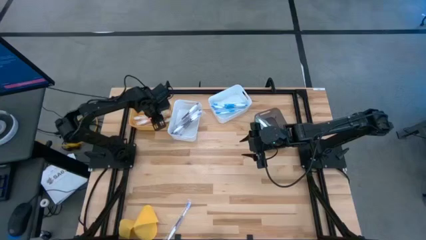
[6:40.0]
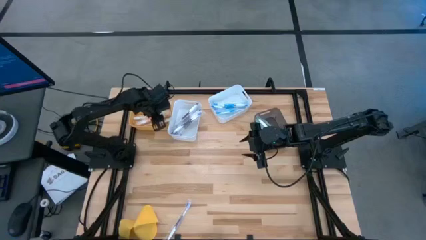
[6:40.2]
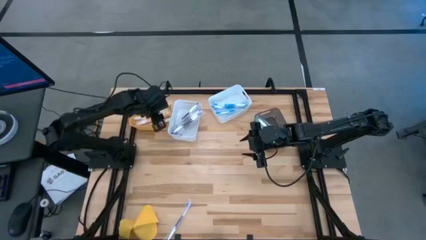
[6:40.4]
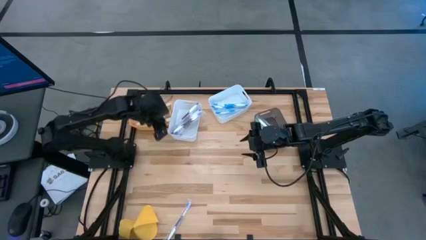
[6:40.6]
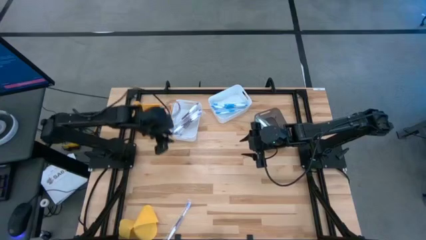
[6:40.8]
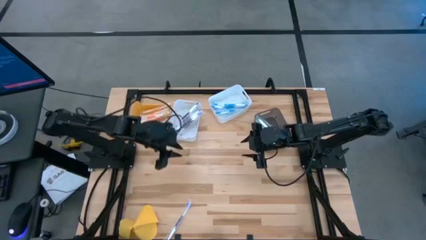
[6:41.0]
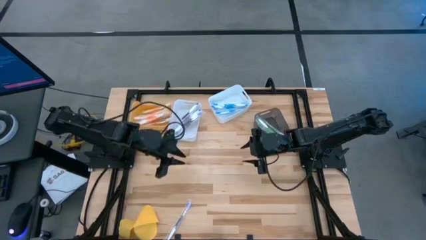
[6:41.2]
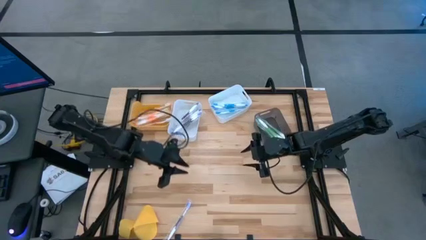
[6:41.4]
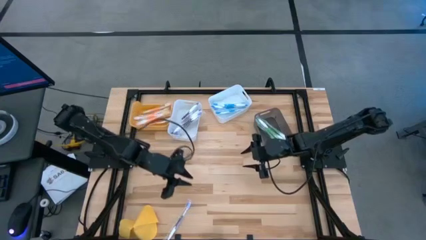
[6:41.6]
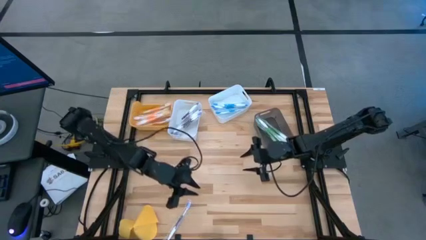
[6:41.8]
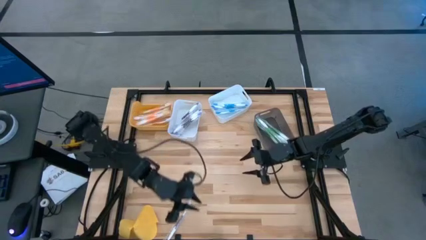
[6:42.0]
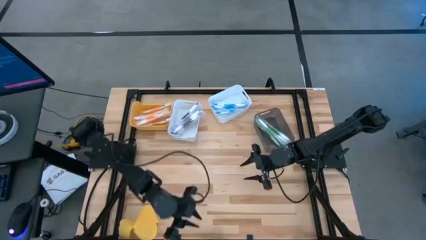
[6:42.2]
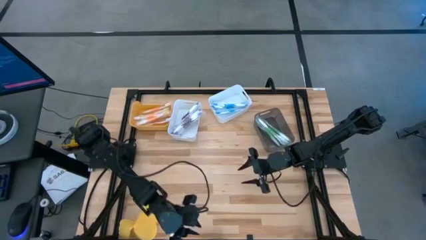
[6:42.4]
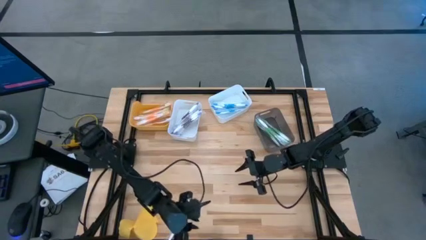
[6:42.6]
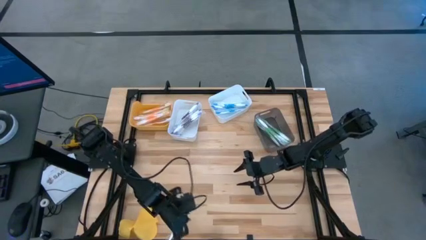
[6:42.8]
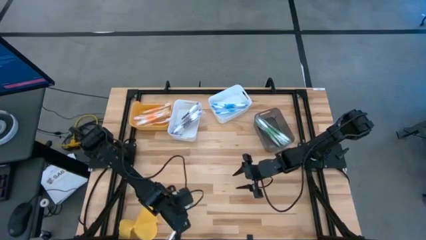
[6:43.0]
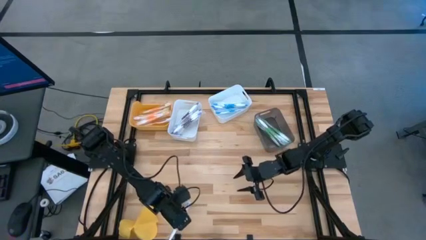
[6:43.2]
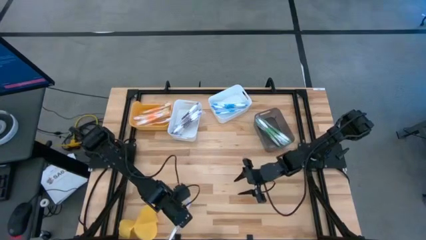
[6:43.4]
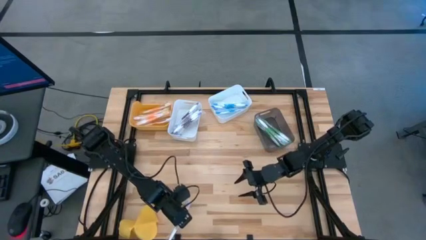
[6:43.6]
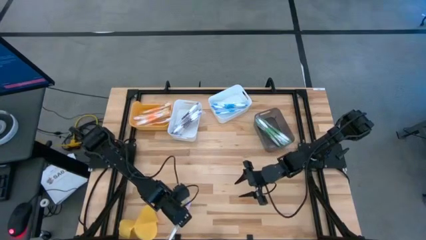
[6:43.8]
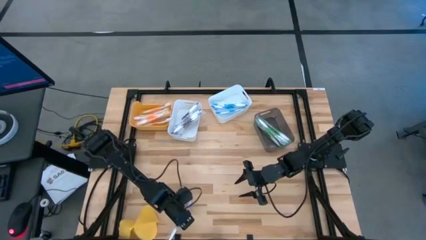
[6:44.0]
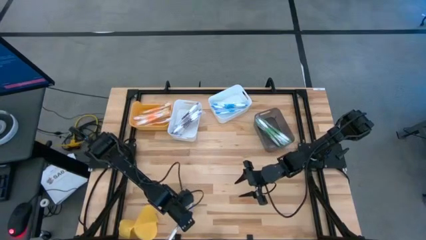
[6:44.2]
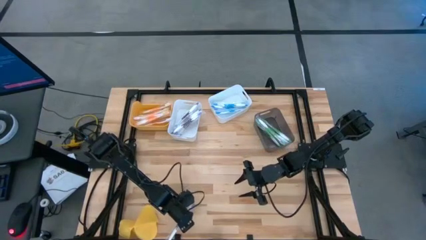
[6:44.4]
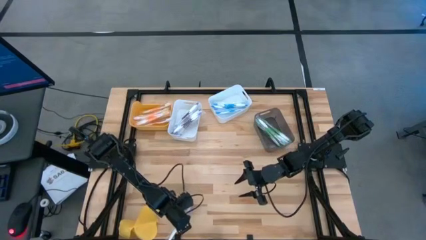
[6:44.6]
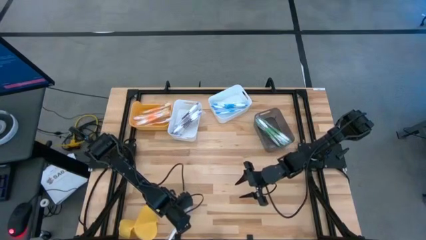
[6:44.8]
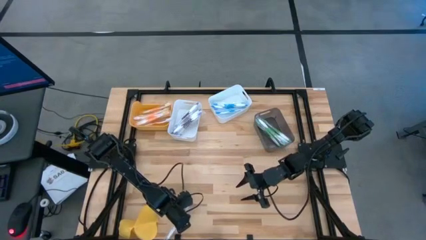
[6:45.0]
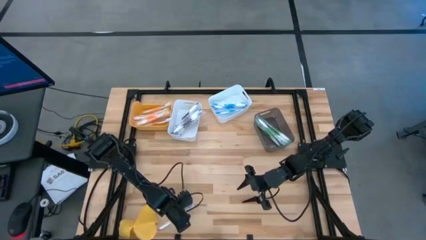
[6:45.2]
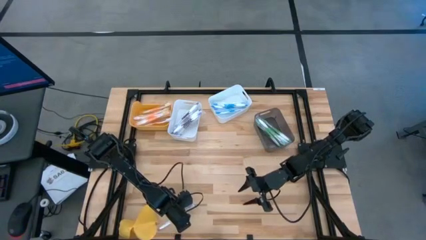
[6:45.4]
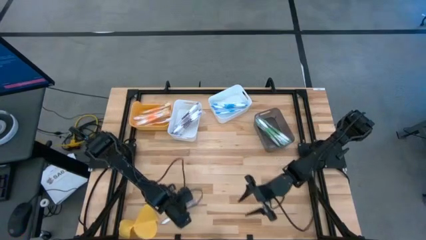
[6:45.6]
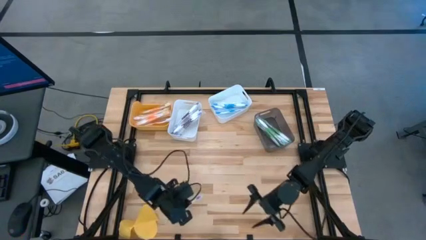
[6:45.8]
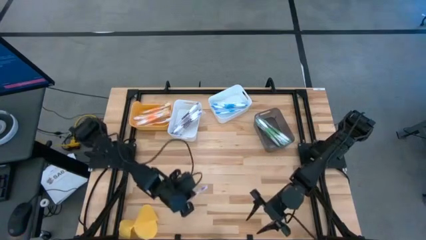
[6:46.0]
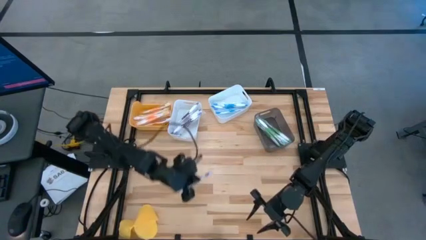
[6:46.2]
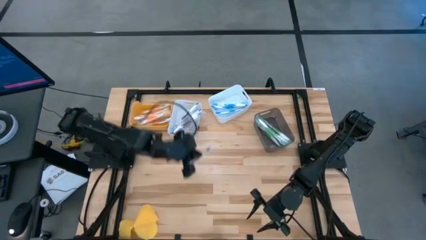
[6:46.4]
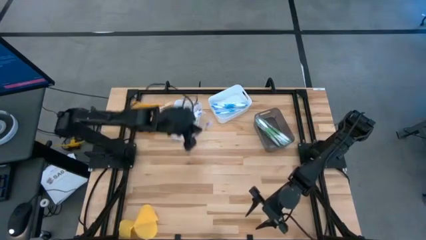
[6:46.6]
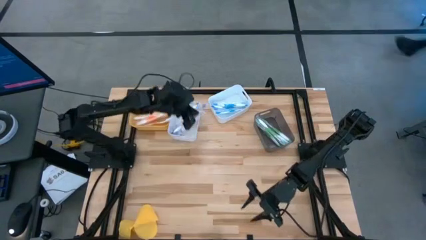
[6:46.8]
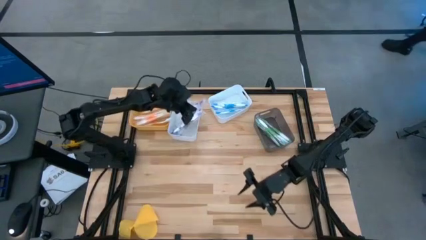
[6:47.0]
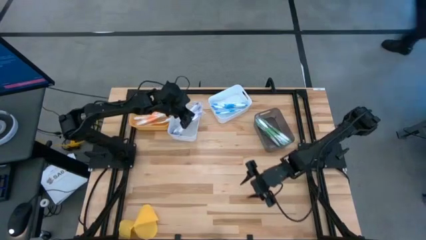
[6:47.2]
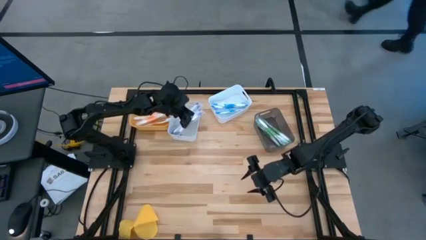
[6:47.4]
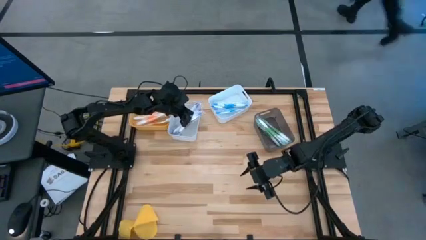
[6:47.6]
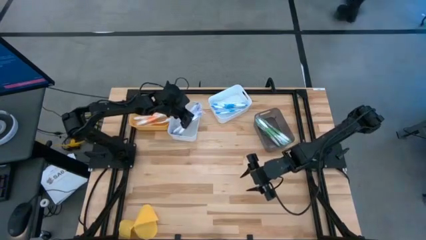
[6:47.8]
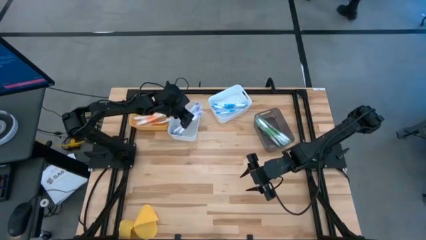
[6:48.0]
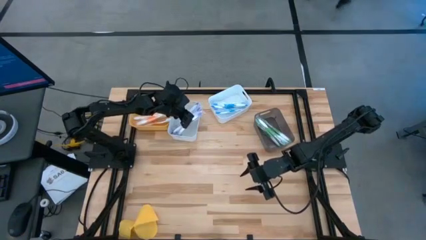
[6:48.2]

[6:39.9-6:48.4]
Task: Pick & Place Toothbrushes
Put the purple toothbrush into the left white bin

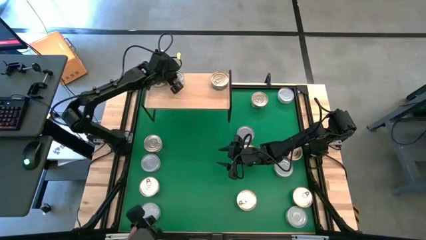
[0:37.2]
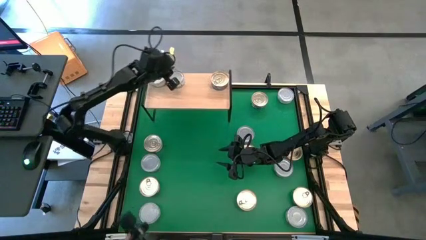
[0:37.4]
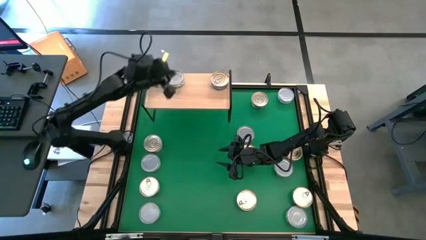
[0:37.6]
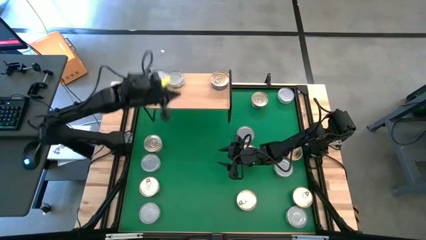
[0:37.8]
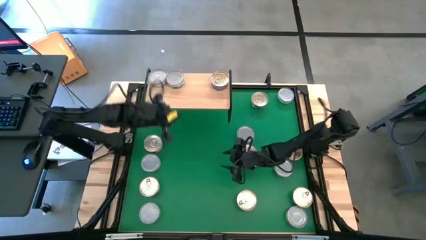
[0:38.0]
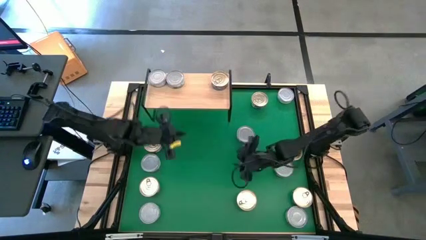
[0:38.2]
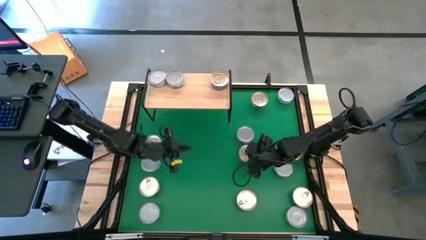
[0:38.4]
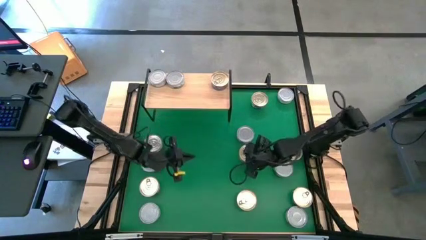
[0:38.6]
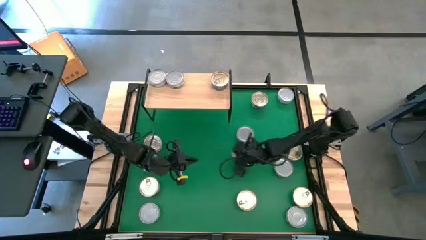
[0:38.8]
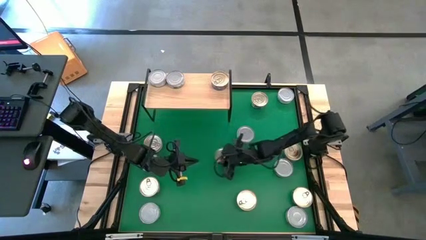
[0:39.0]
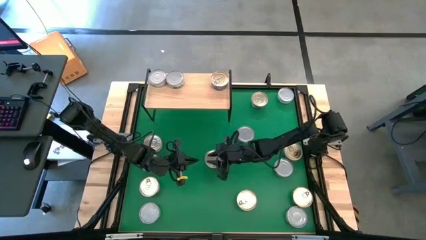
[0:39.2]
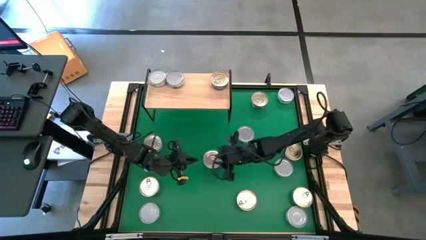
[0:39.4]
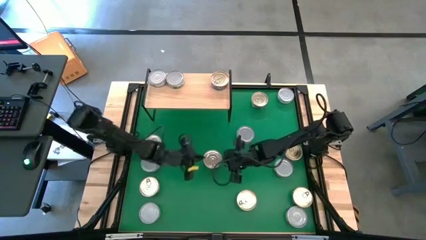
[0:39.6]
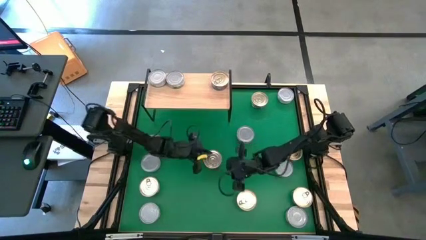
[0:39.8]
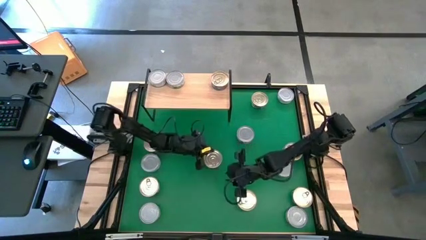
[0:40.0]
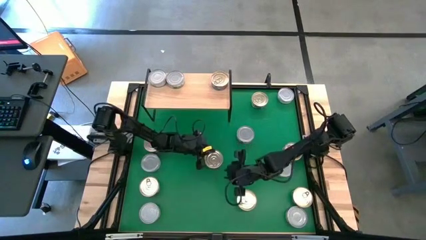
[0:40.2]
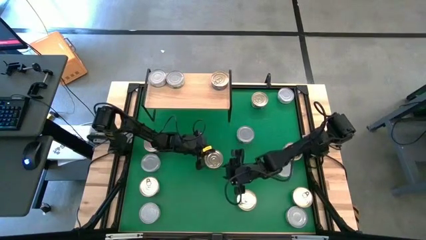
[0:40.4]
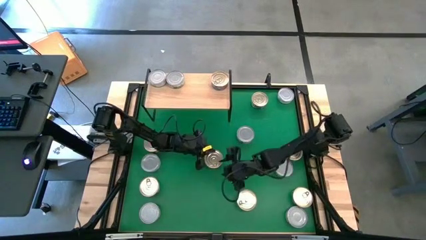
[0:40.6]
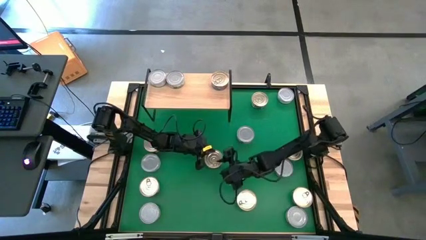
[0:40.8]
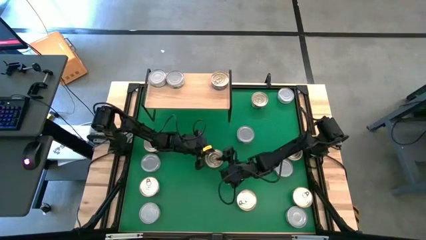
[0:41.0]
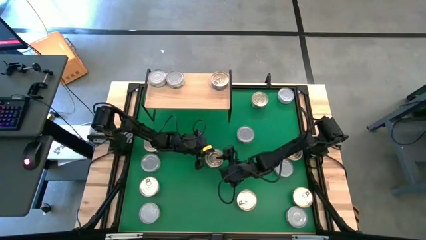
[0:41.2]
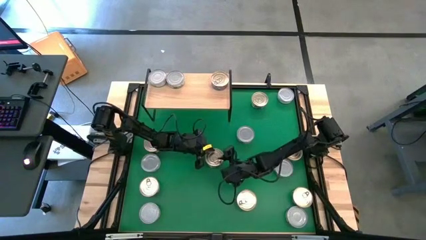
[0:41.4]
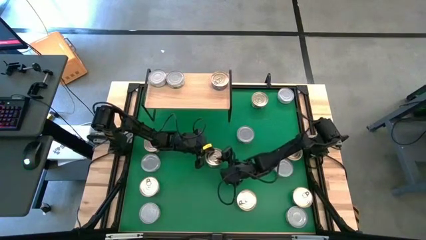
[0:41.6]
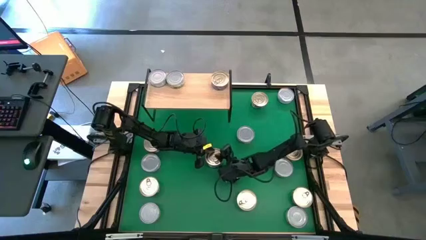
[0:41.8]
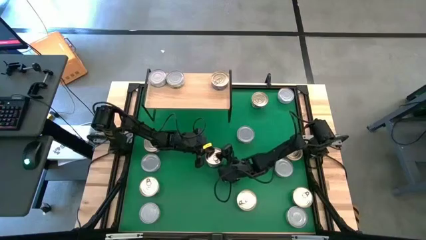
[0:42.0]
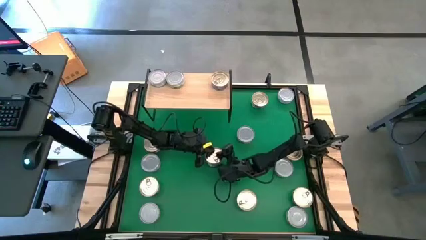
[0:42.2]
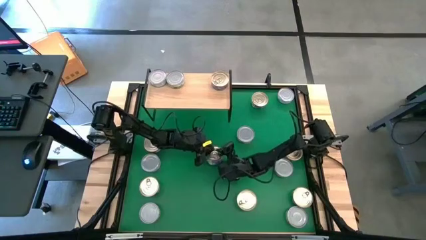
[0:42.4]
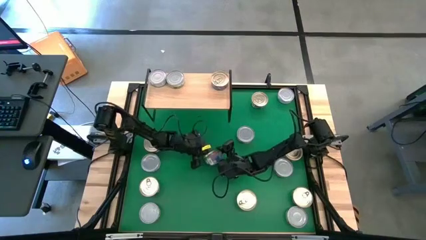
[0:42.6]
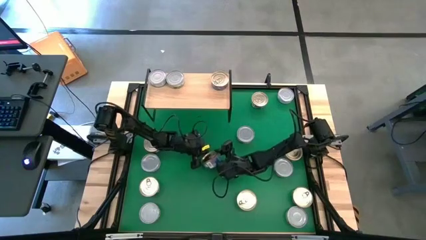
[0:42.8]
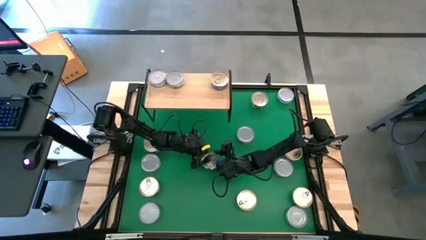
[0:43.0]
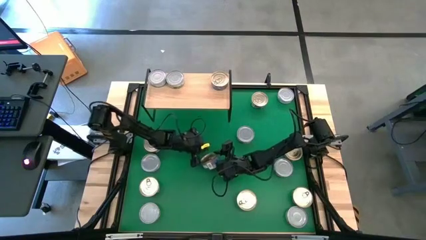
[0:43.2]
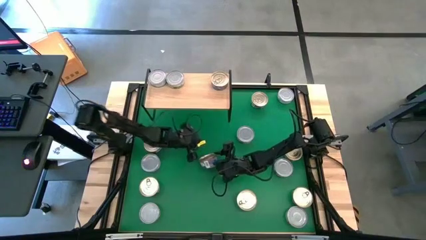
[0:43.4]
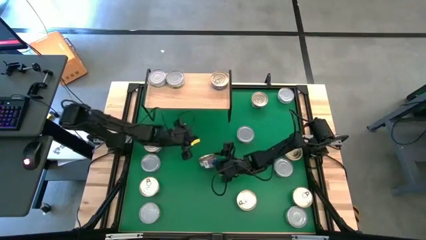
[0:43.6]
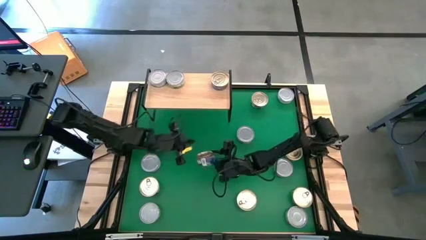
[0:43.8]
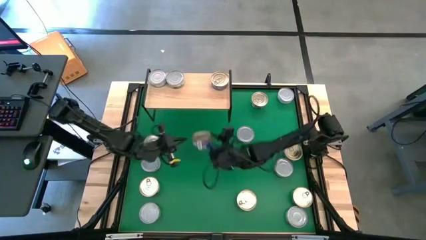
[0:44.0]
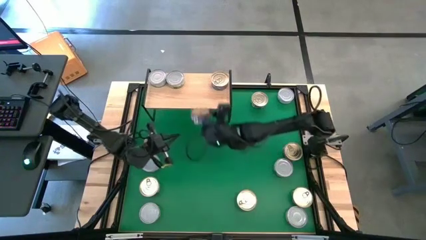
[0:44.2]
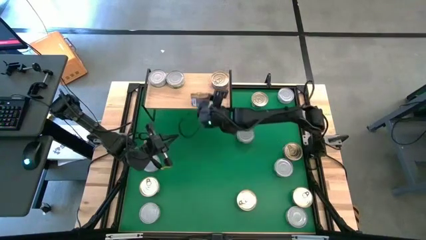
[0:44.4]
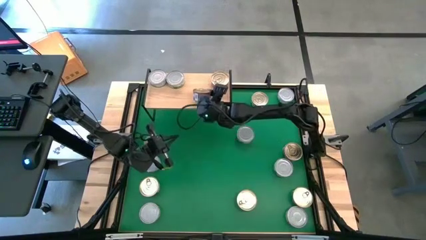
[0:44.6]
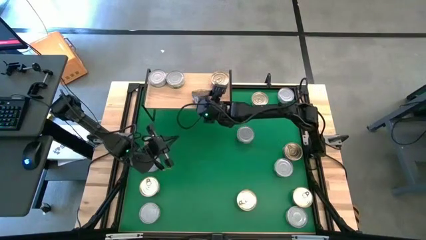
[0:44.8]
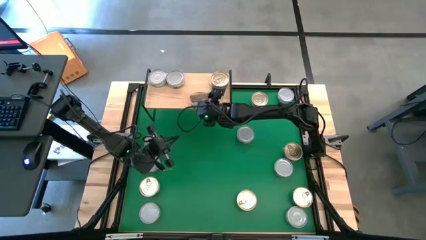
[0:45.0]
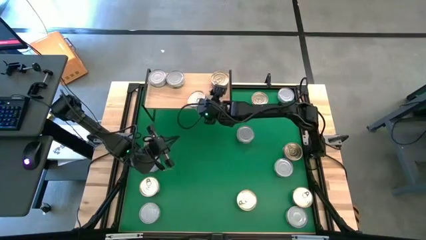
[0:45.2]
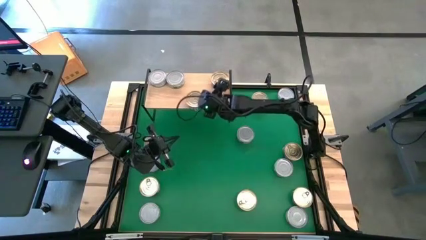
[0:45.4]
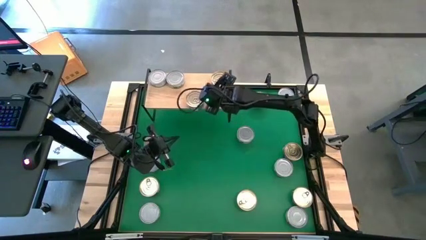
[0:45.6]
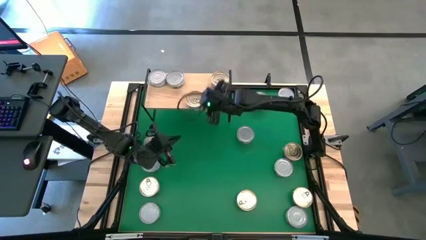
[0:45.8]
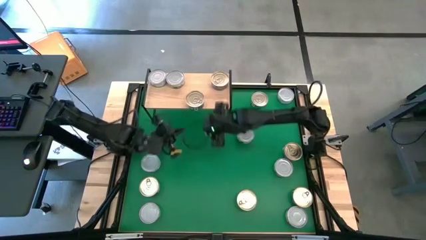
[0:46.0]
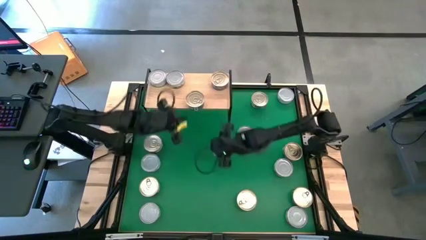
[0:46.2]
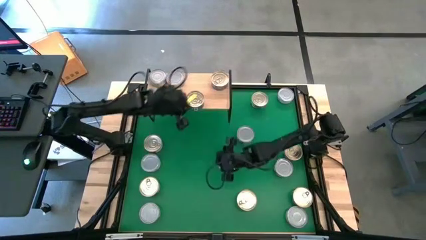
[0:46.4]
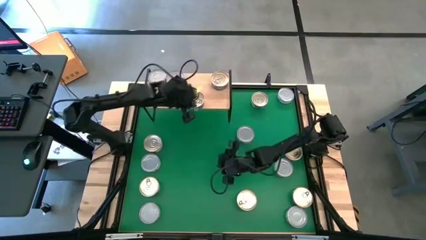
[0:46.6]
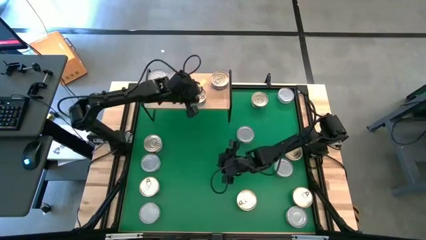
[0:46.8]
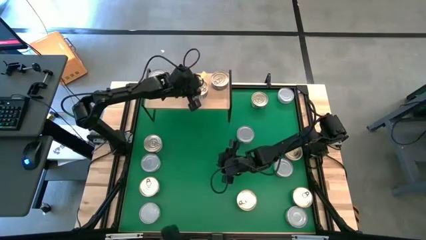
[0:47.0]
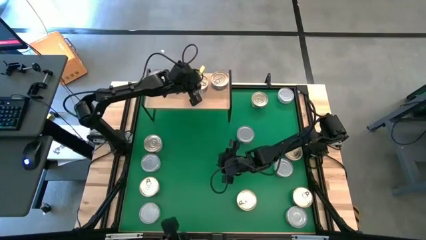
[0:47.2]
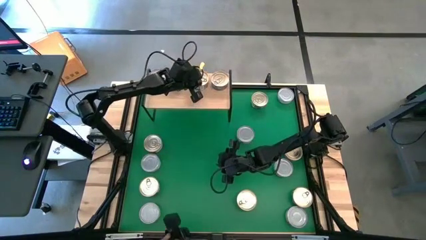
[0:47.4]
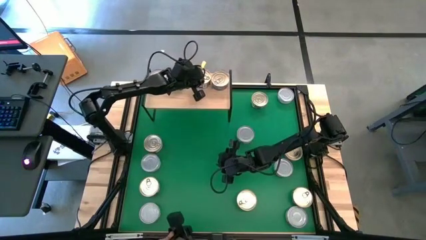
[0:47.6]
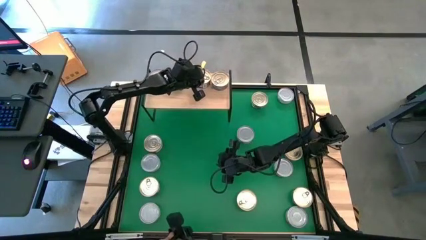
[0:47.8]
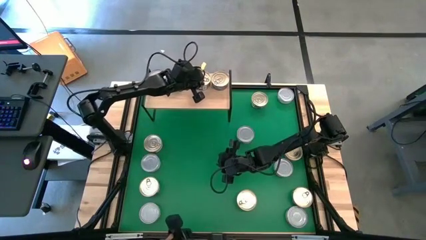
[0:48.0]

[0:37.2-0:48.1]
Task: Stack canned seafood by type on shelf
Put the blue-pink tuna can on the shelf
